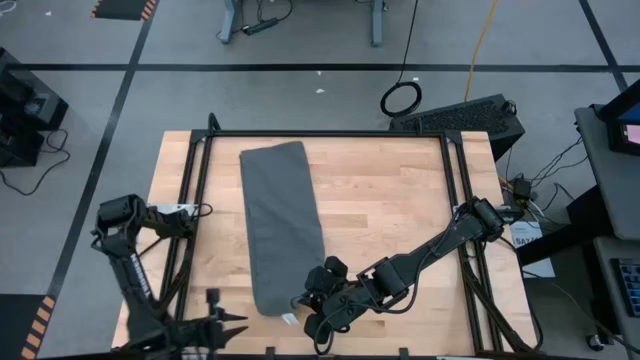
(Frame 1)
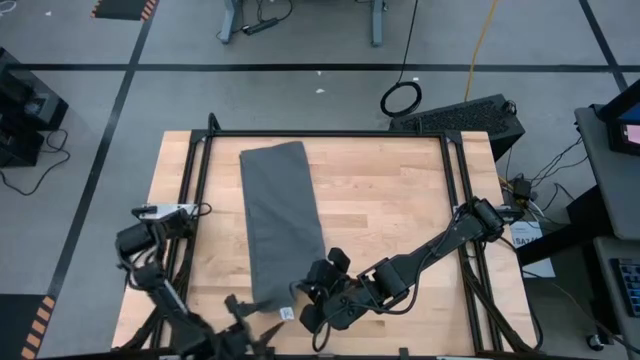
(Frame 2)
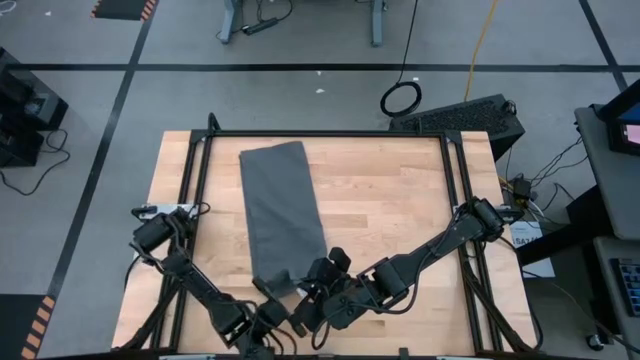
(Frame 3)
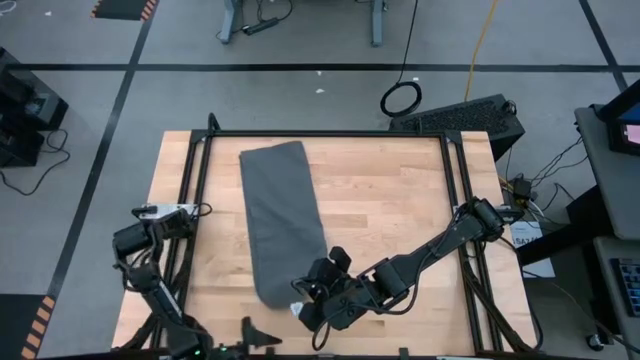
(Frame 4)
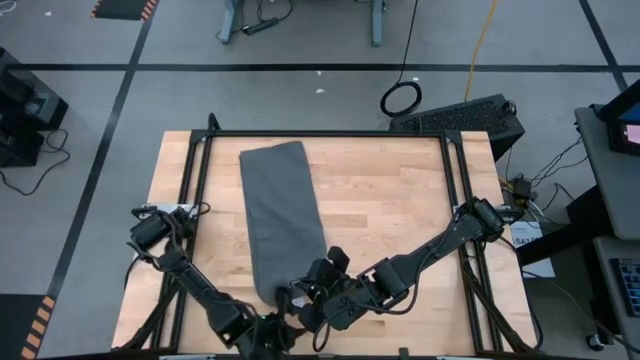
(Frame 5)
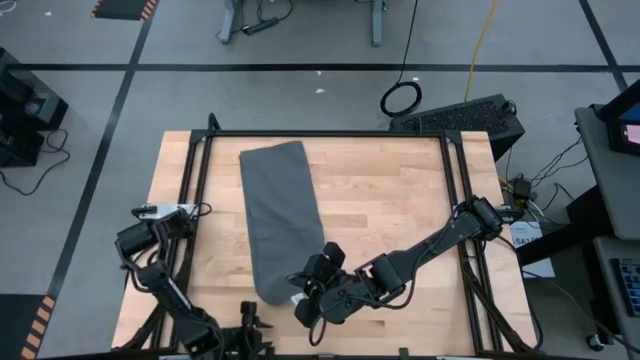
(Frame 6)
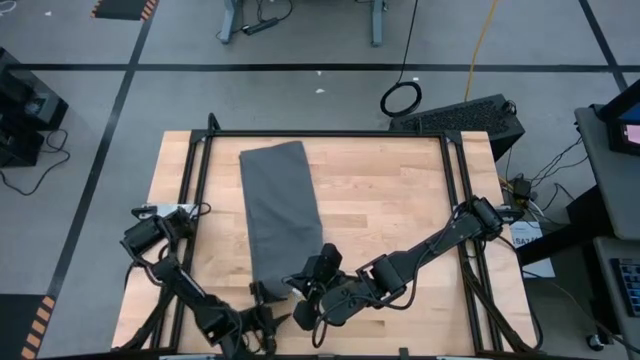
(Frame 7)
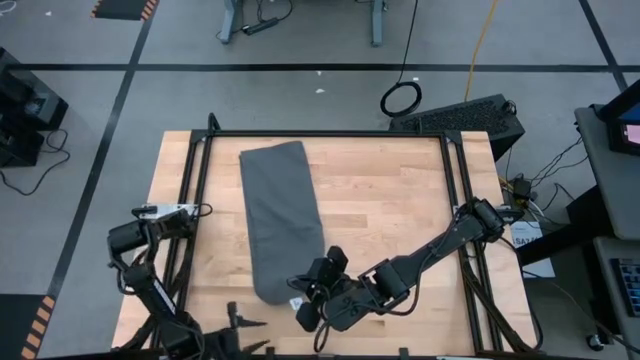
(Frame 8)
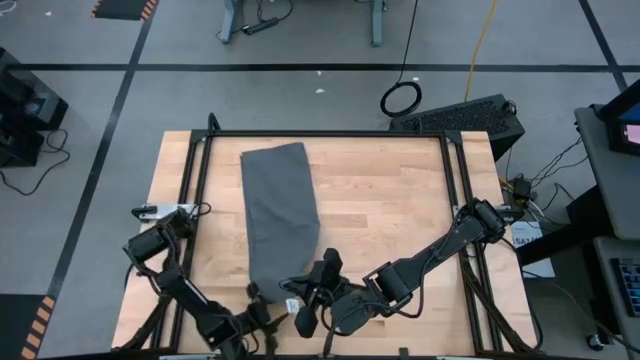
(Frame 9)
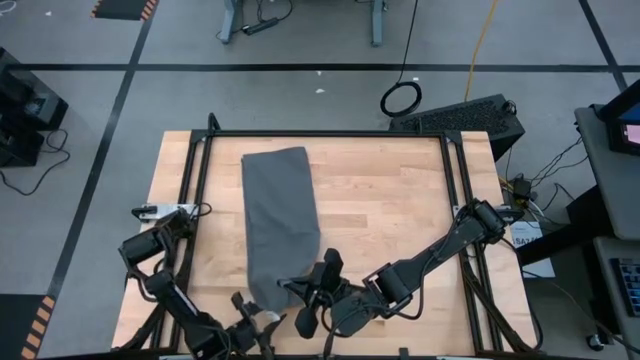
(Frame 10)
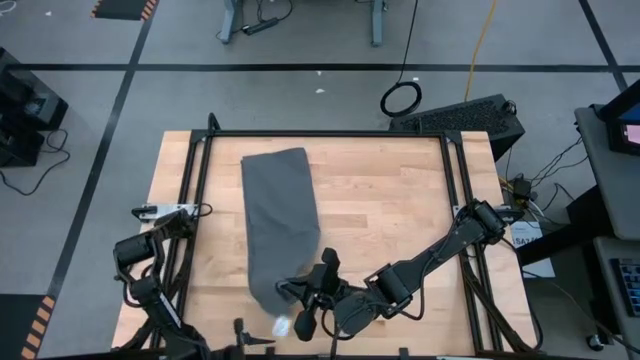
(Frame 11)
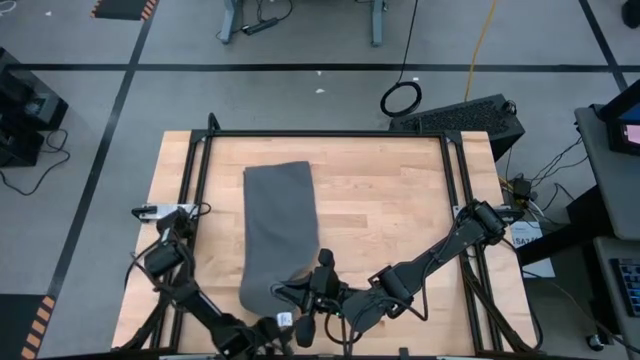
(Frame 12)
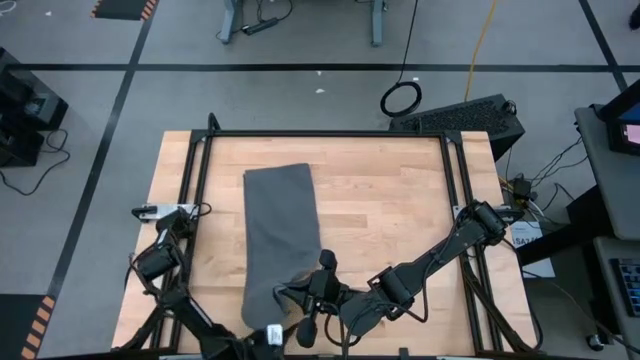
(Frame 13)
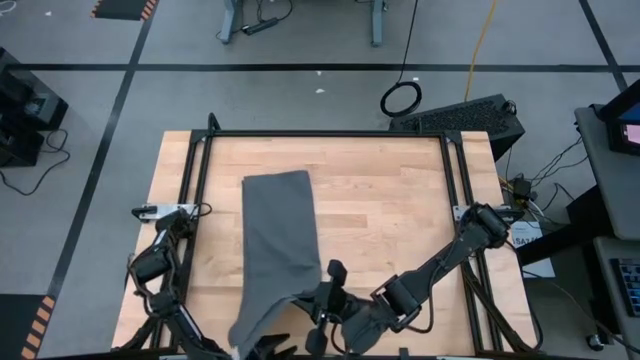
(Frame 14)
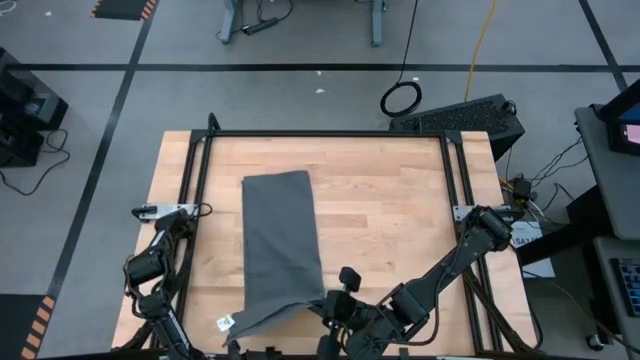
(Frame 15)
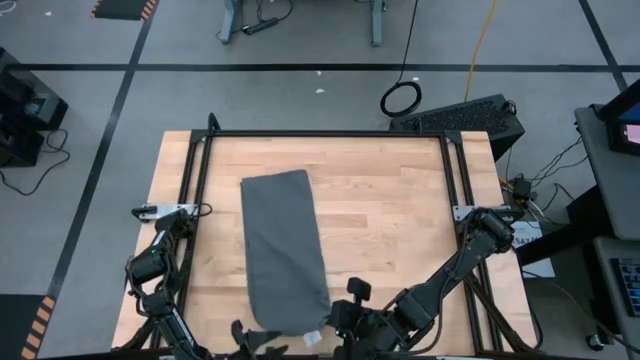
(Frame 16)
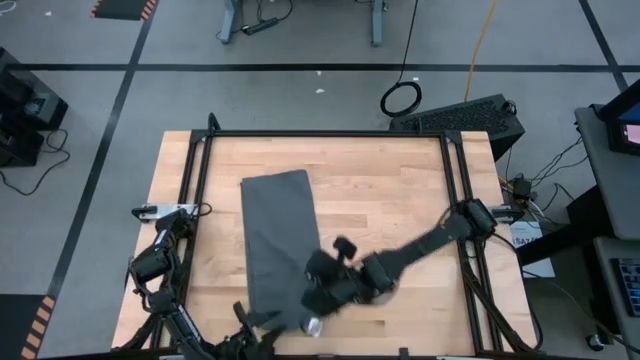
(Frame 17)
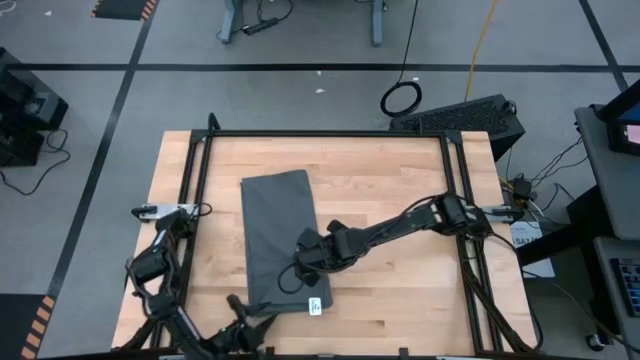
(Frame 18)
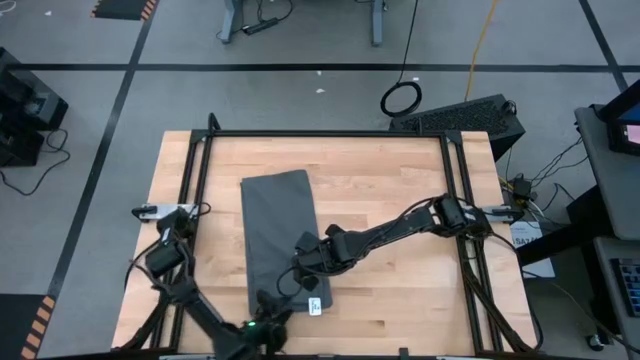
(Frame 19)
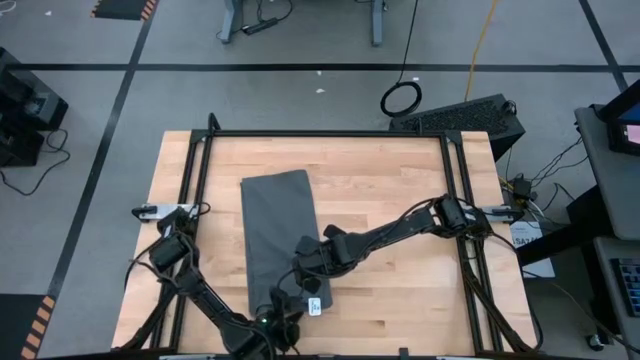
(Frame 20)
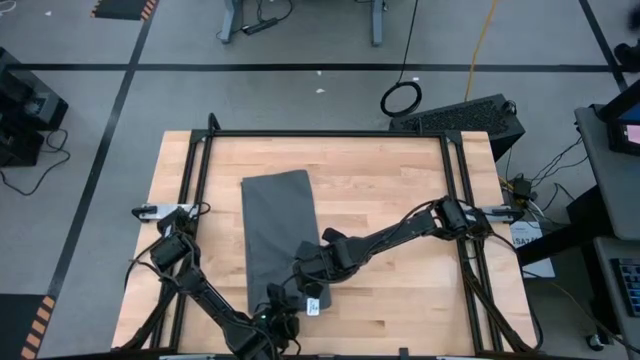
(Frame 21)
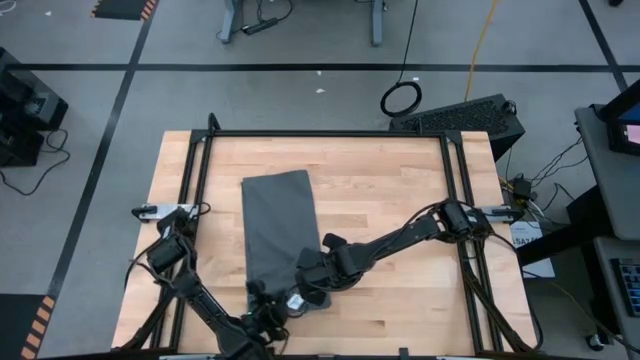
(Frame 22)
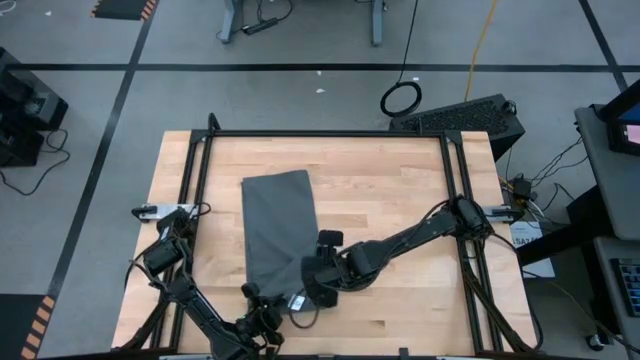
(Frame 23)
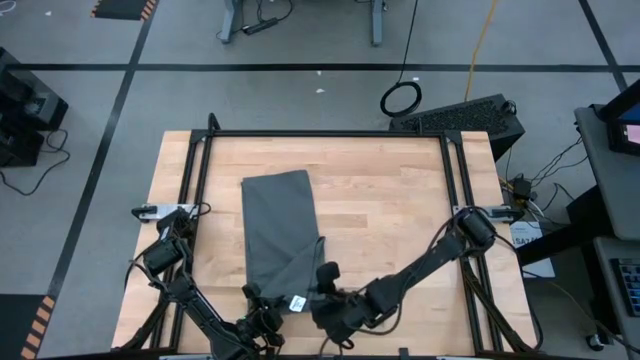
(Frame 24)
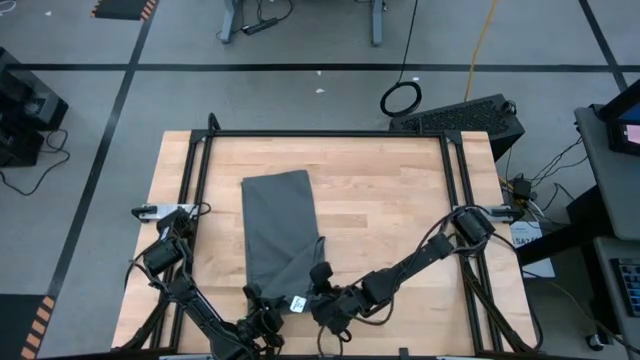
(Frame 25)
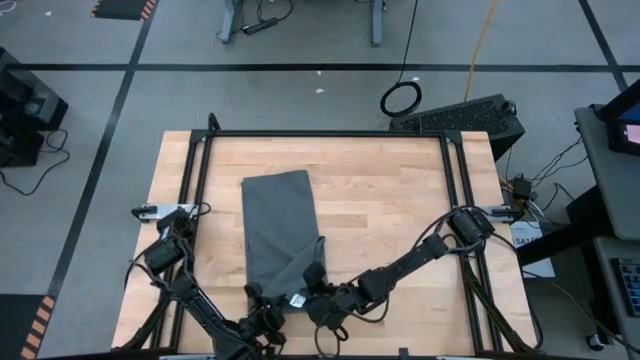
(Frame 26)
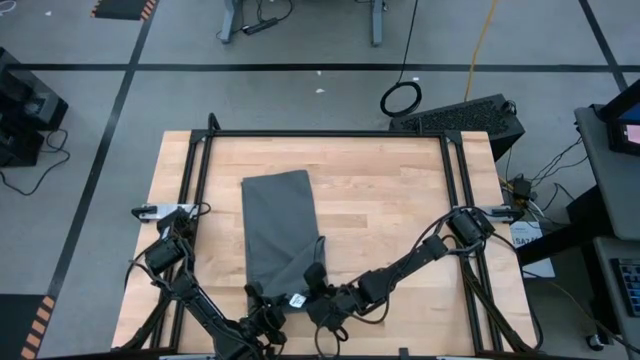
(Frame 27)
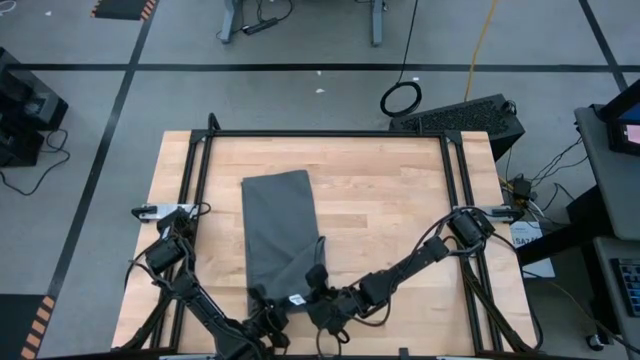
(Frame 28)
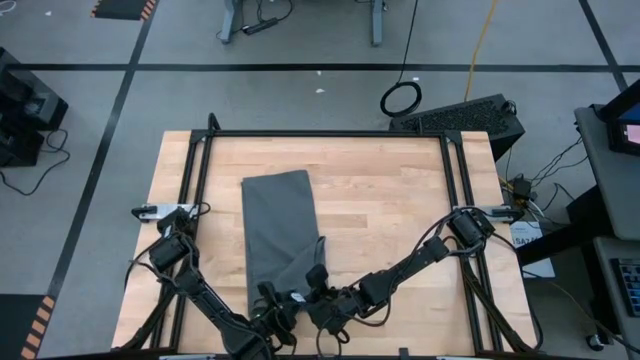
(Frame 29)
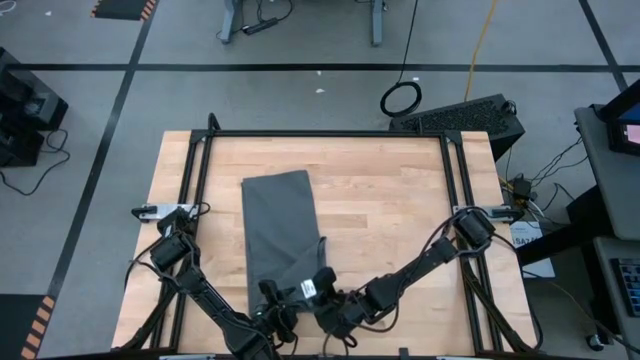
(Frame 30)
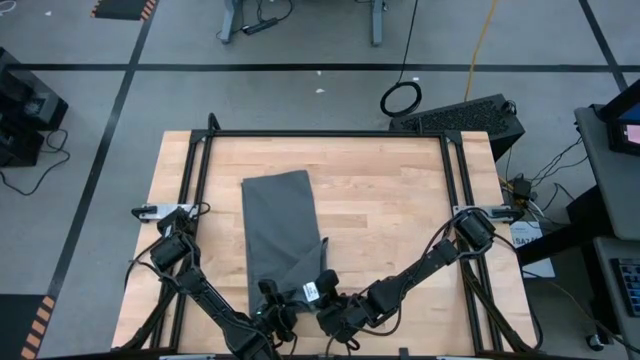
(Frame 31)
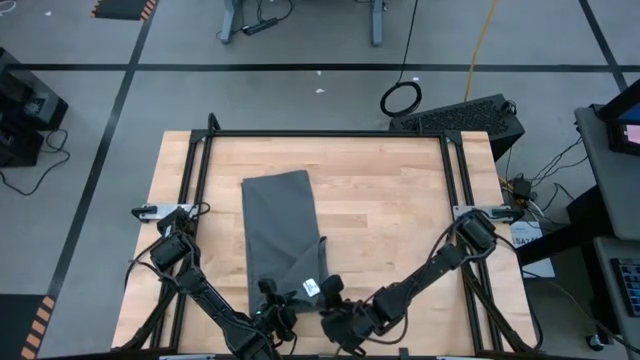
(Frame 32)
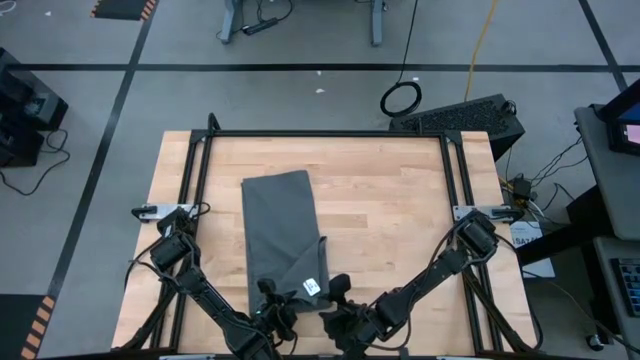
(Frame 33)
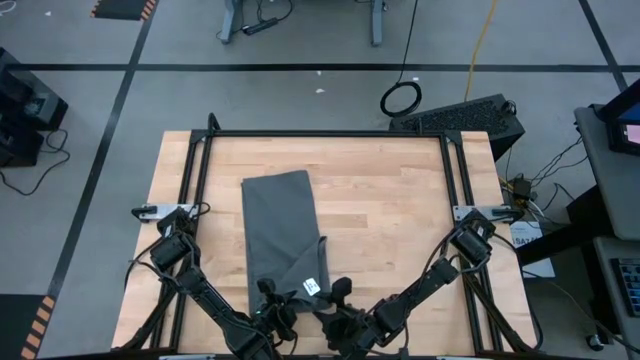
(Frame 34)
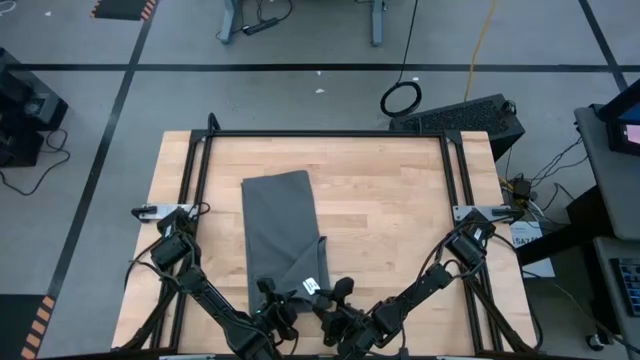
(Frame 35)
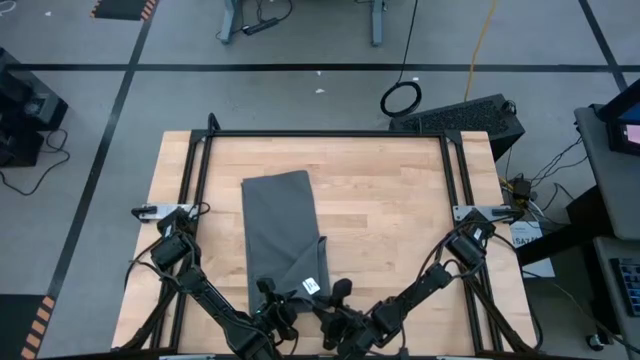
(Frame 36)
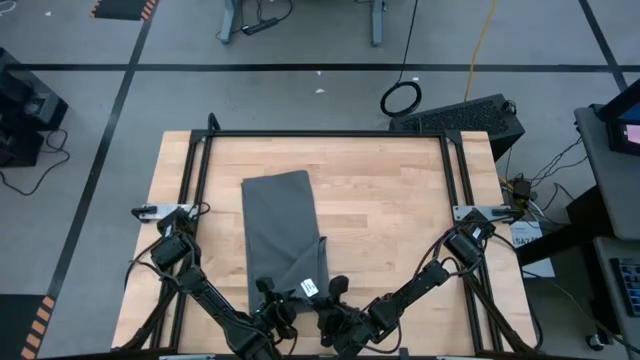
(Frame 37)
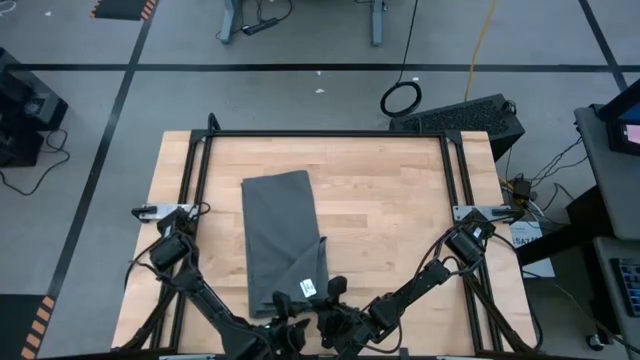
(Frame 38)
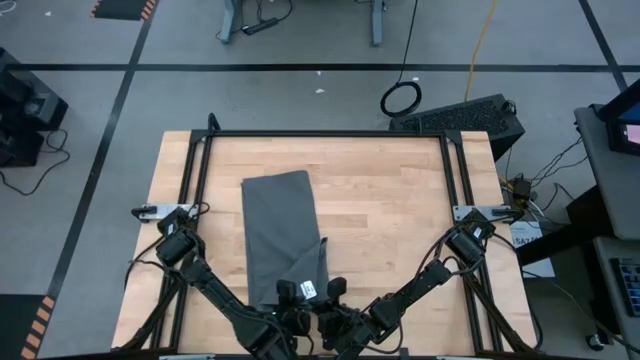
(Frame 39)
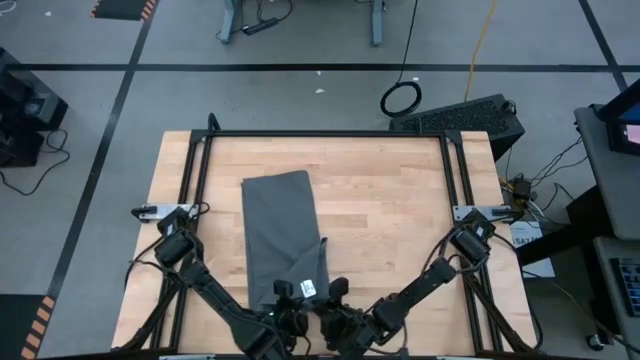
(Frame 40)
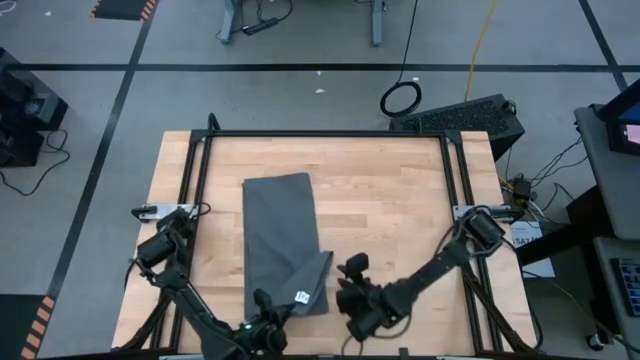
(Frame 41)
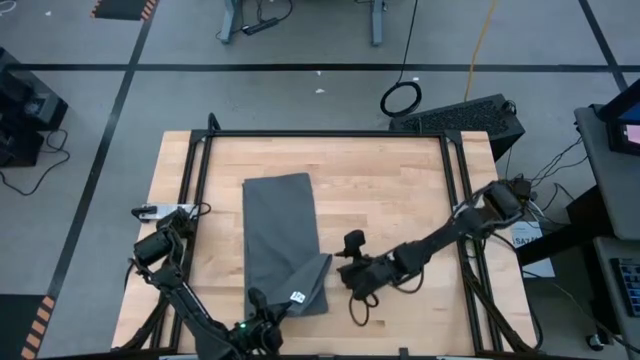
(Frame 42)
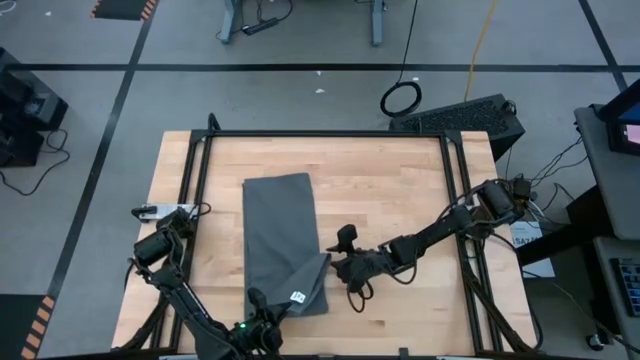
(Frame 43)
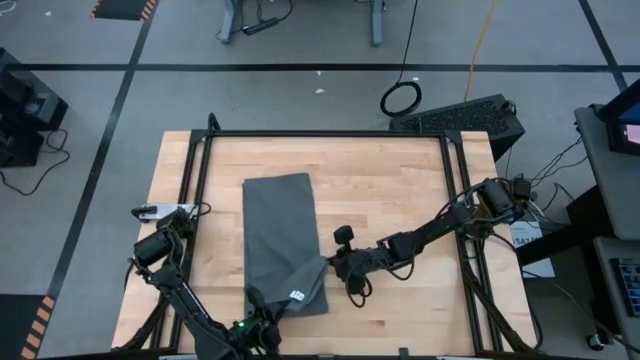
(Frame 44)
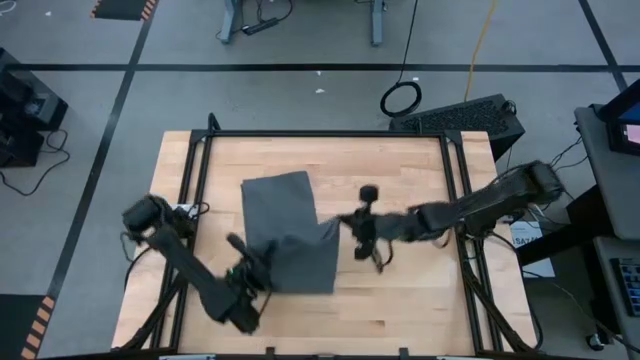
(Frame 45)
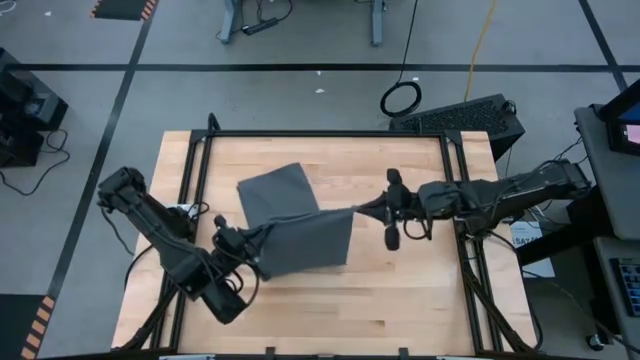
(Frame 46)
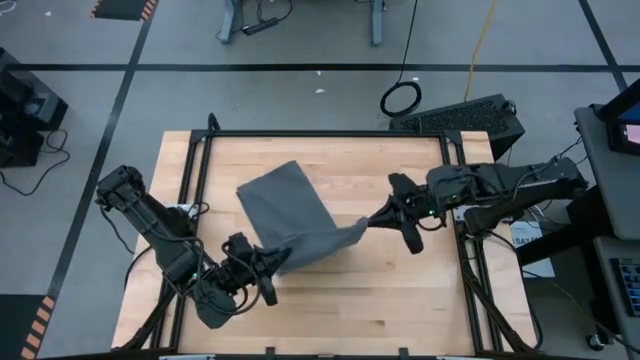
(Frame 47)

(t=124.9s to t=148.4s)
Task: Roll towel into tight, uniform cylinder
Roll the gray towel
